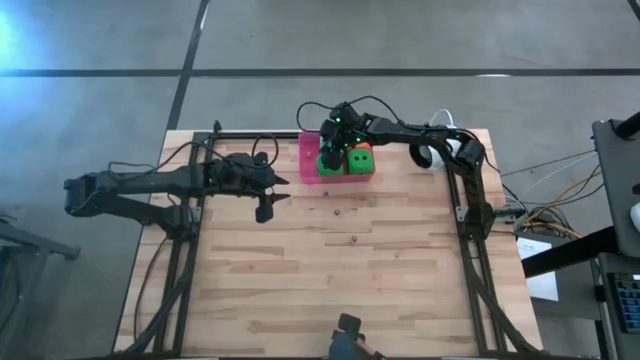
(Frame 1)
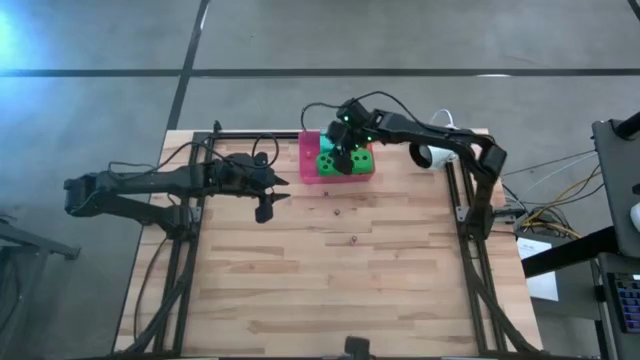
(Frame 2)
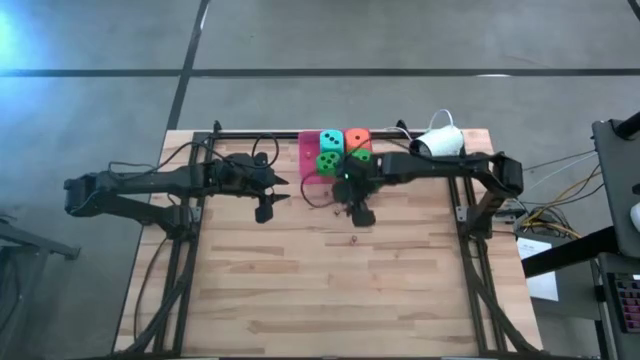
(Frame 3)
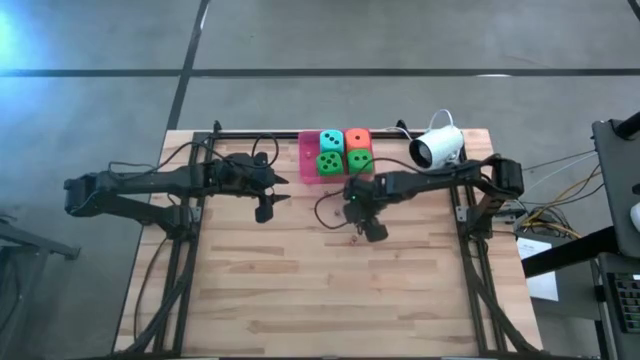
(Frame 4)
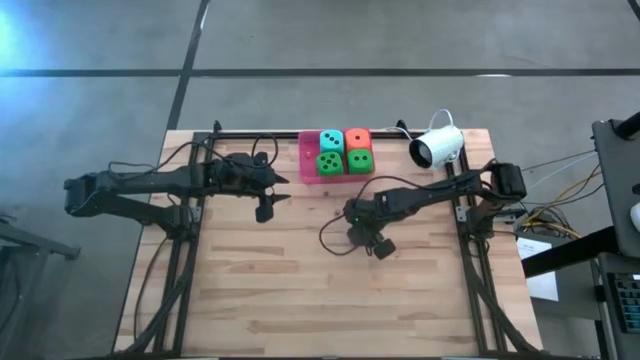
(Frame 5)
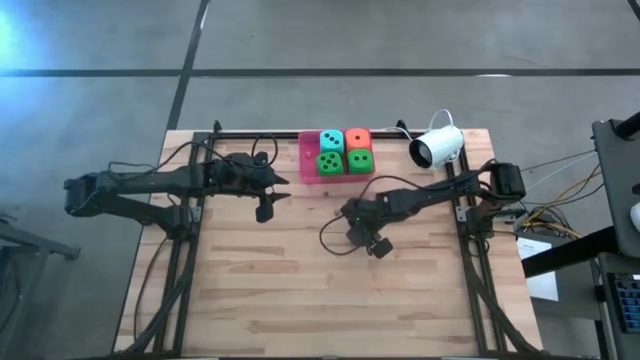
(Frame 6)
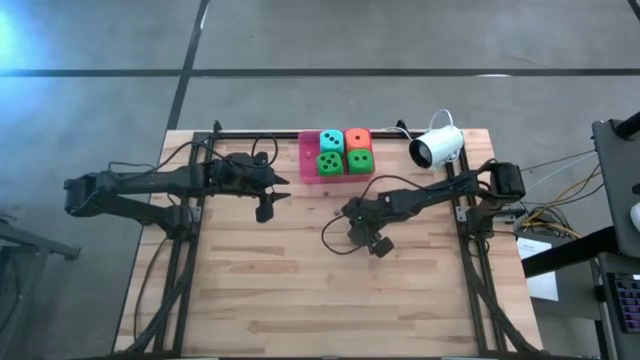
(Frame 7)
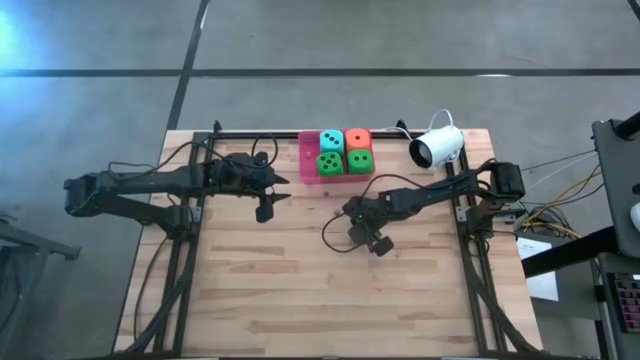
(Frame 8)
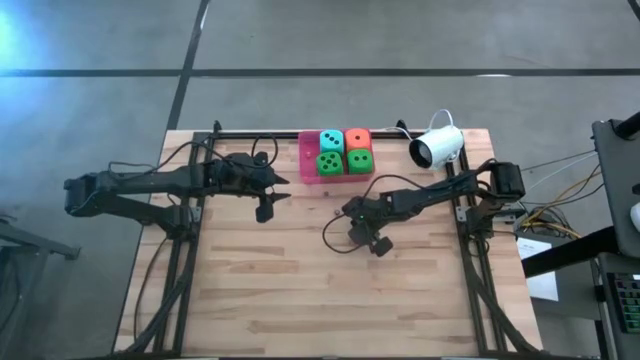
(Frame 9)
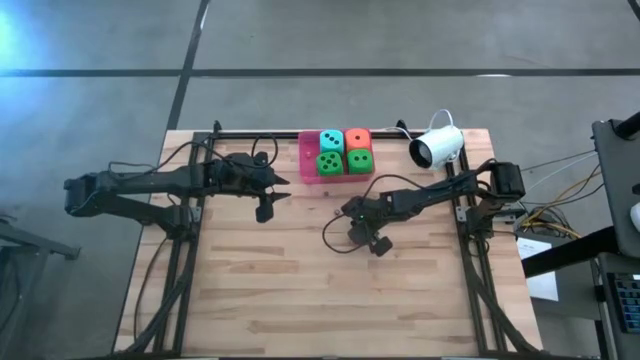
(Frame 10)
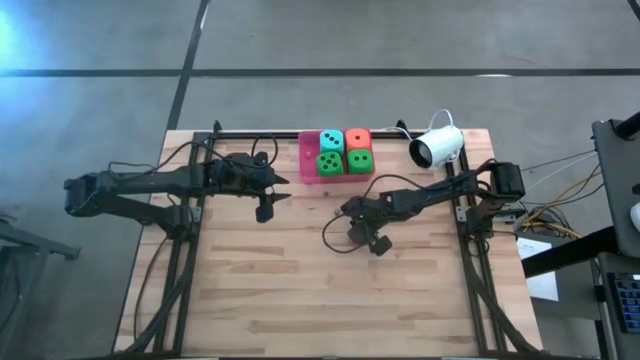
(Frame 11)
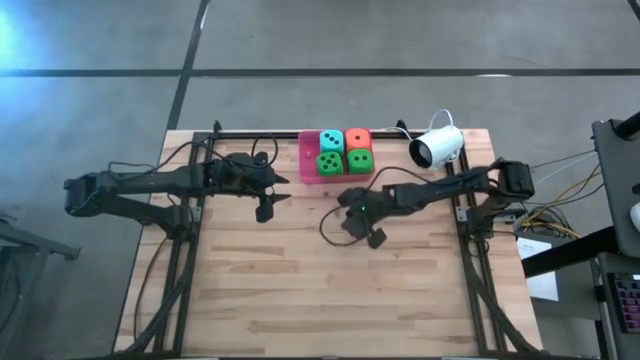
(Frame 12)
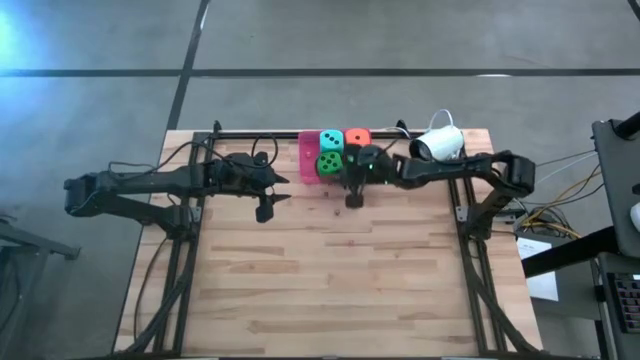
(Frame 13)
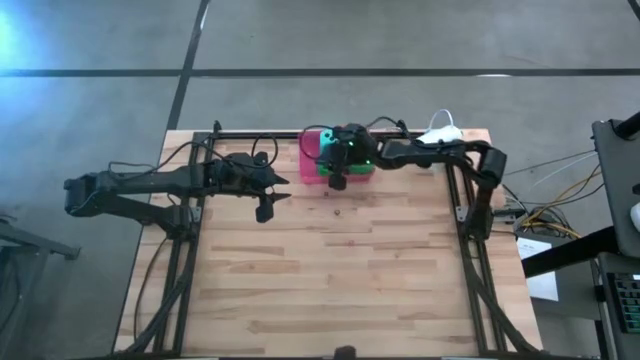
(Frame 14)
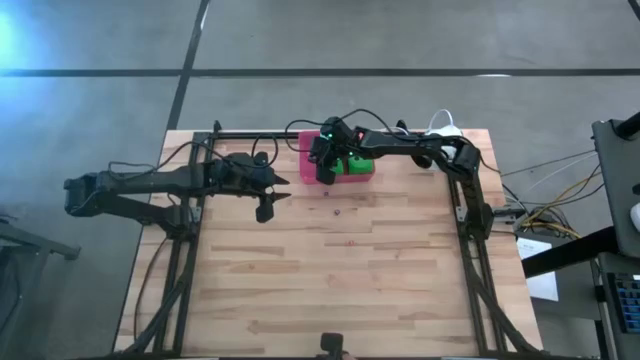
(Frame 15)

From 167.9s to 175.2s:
Task: Pick & Place Dice
Put the bottom small black dice into the pink bin

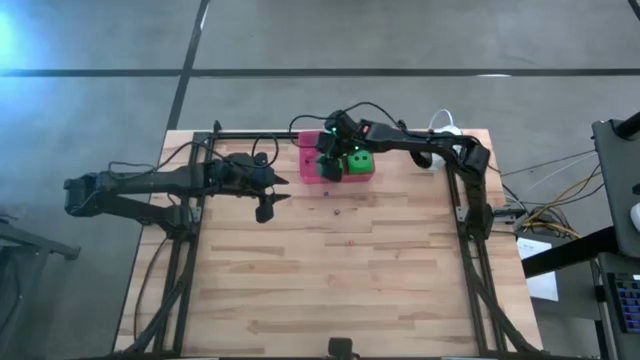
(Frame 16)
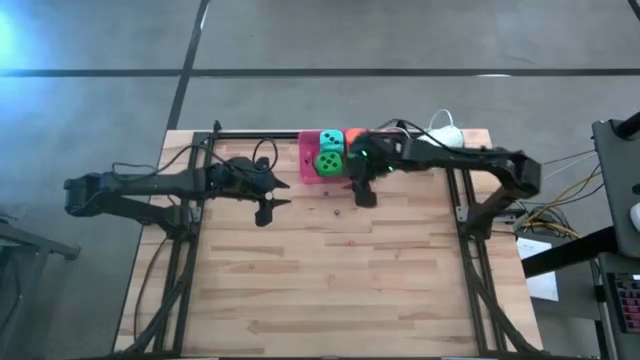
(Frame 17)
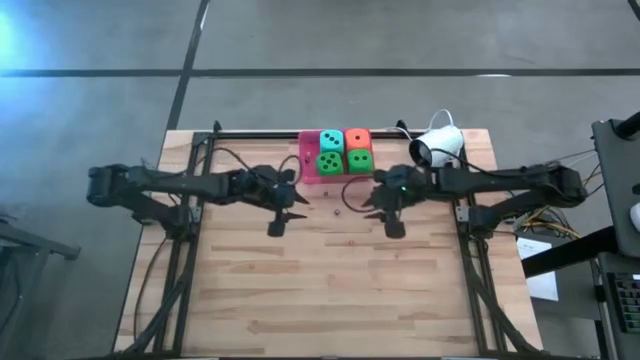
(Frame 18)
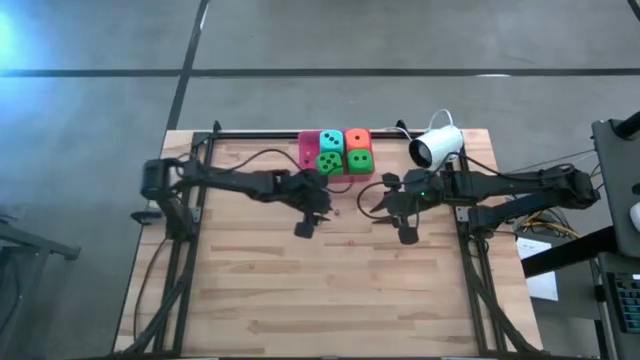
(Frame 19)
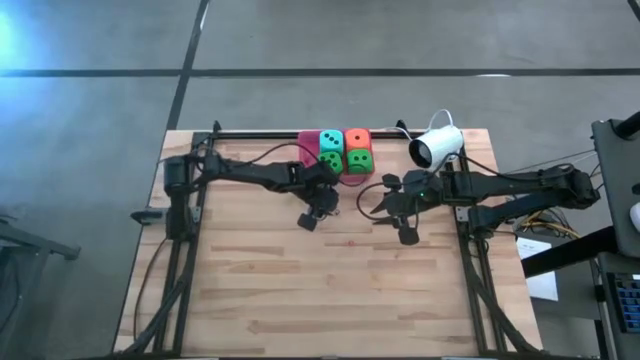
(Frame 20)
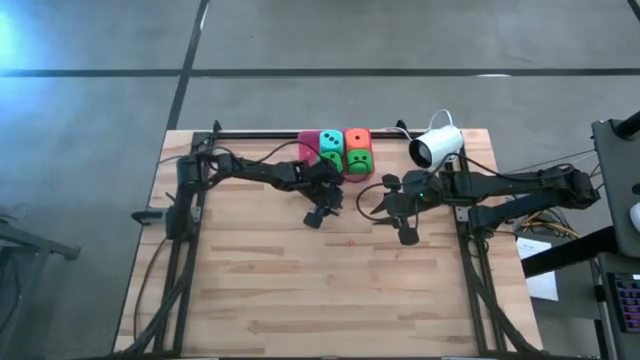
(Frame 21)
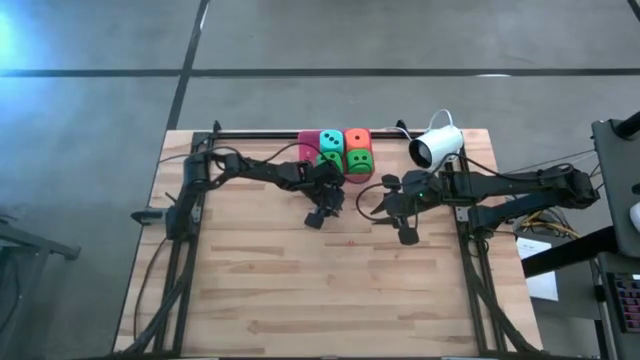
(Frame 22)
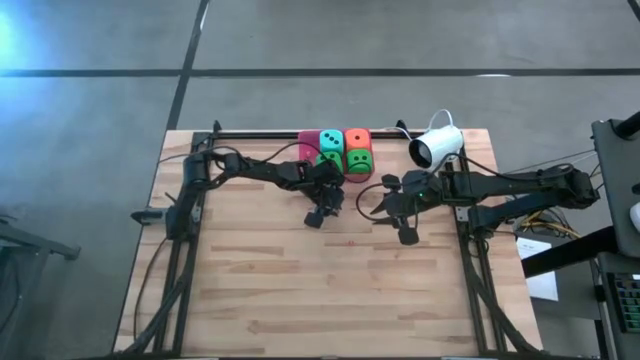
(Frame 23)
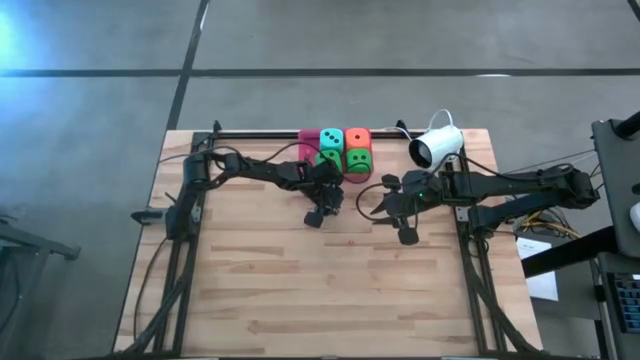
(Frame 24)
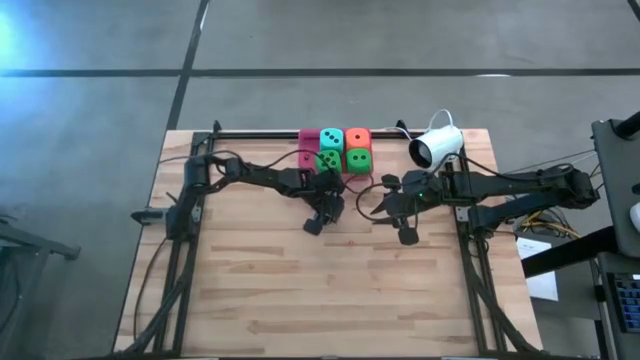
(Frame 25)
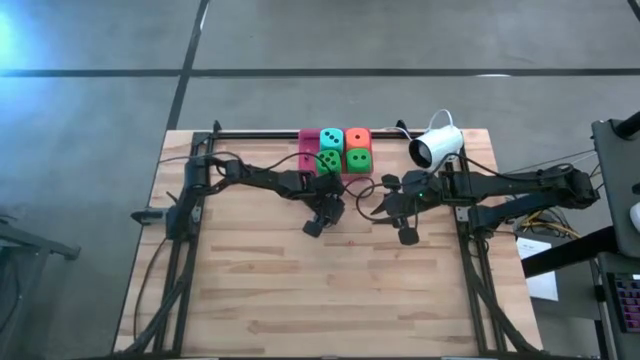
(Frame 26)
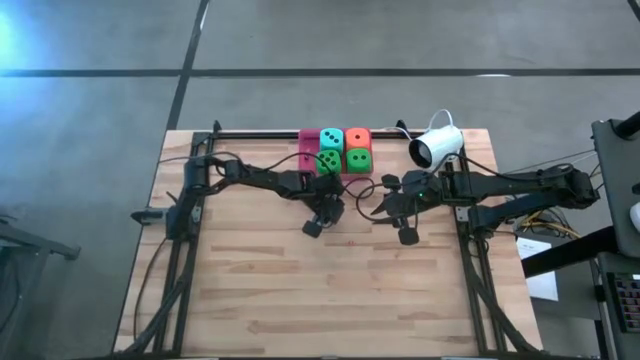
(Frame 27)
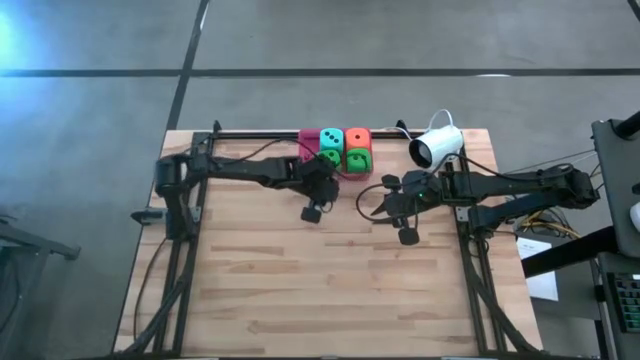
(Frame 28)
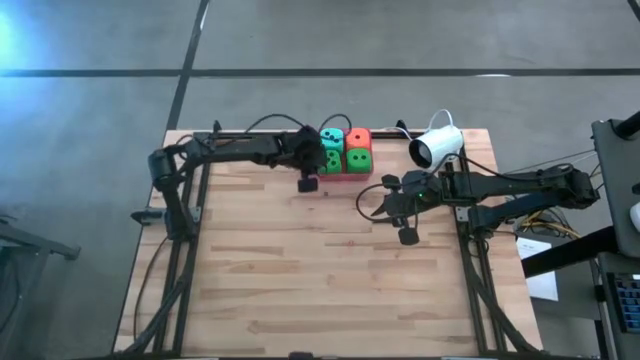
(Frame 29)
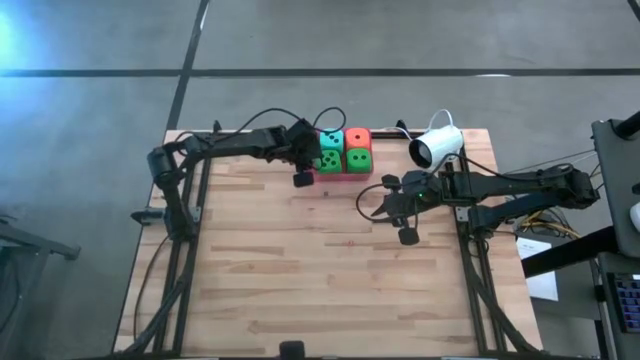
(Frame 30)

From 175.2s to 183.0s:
Put the small black dice into the the pink bin

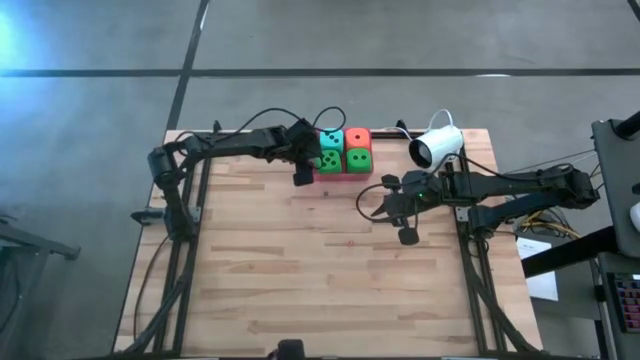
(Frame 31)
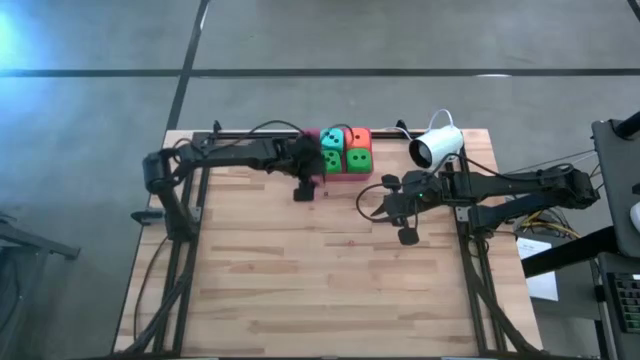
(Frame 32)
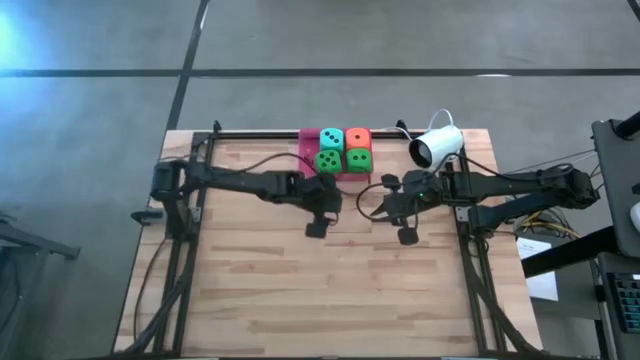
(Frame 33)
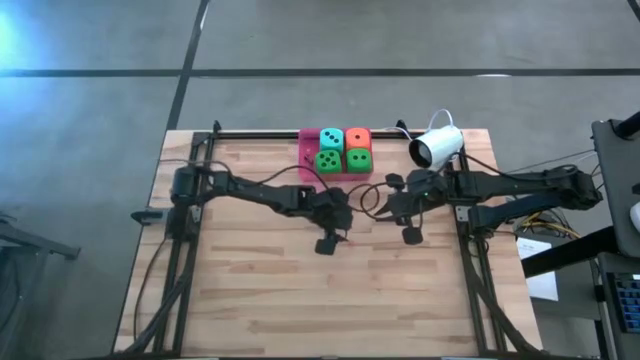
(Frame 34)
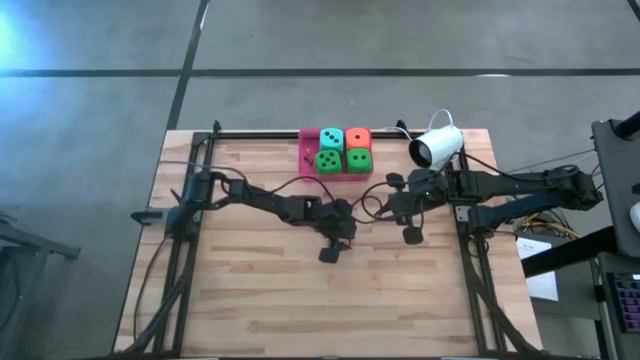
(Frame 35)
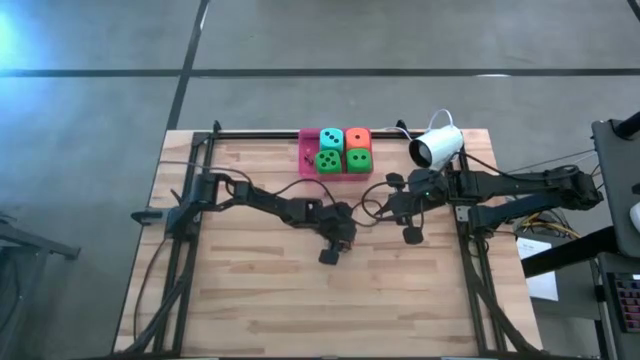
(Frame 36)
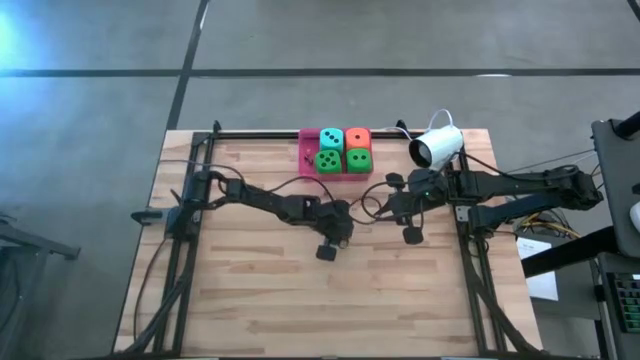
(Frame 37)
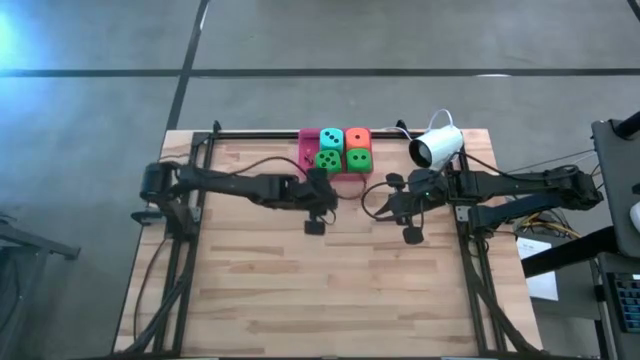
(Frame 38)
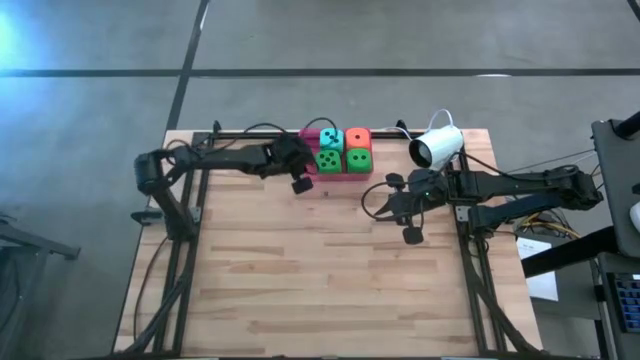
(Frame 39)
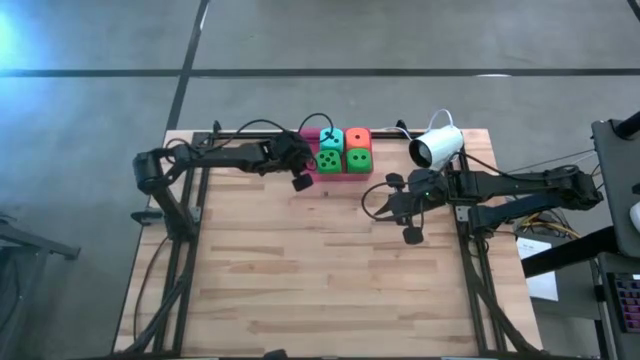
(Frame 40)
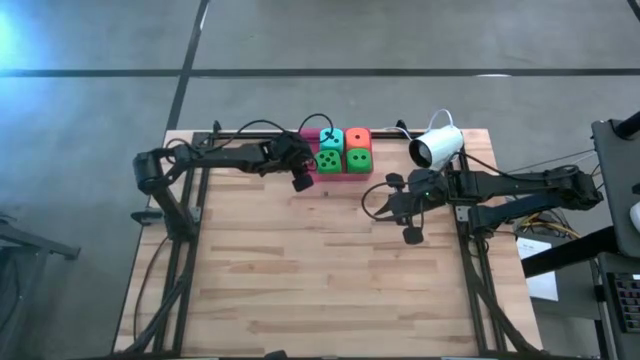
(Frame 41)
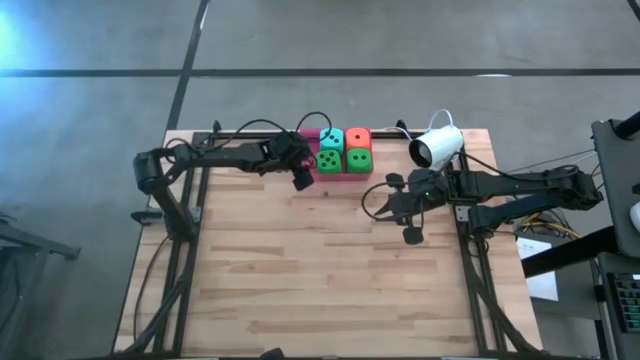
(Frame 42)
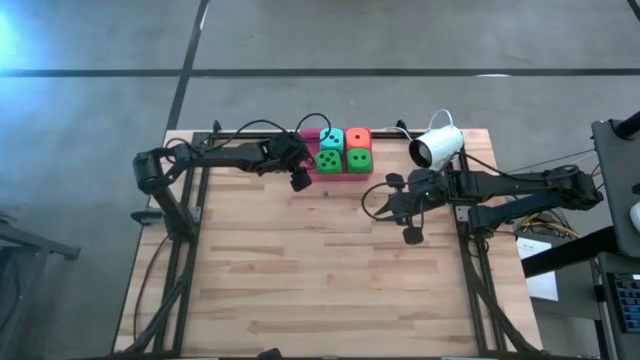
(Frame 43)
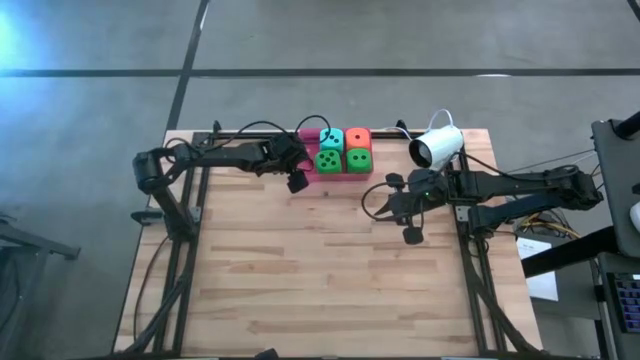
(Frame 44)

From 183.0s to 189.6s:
Put the small red dice into the the pink bin
